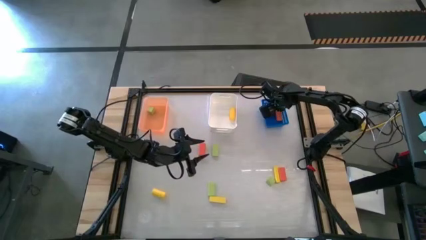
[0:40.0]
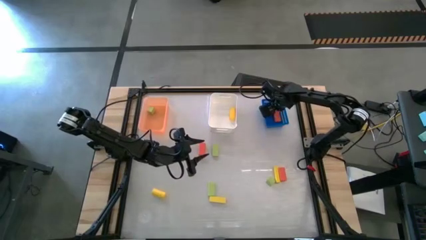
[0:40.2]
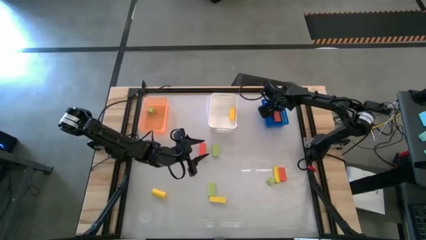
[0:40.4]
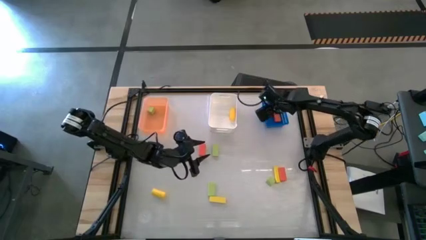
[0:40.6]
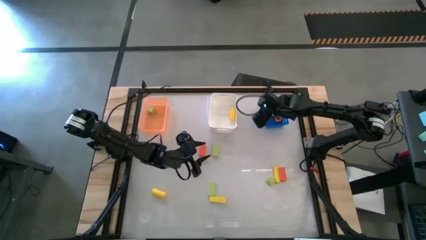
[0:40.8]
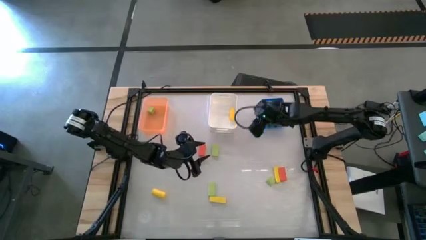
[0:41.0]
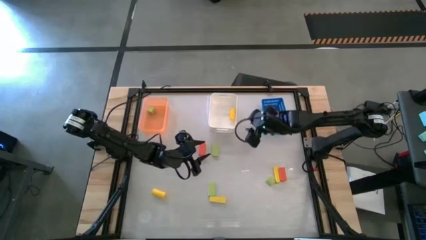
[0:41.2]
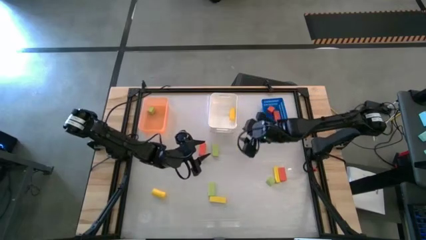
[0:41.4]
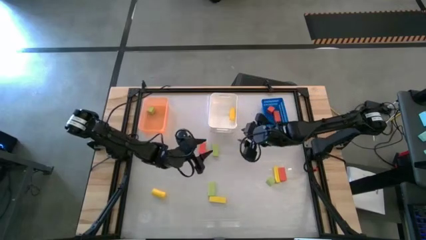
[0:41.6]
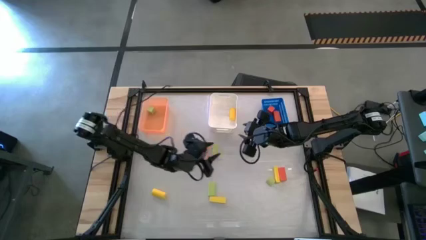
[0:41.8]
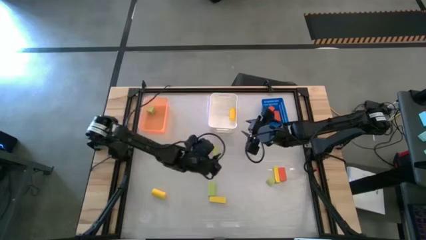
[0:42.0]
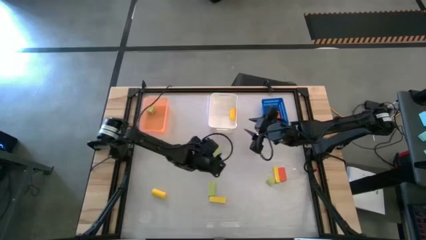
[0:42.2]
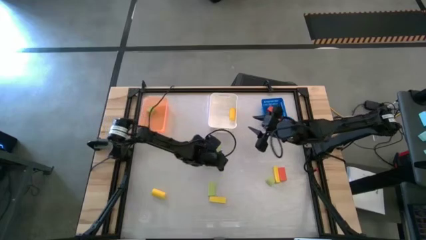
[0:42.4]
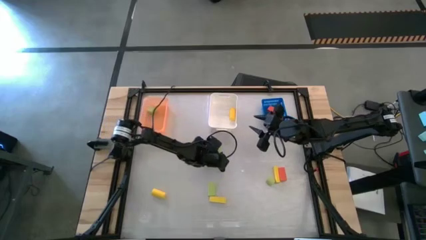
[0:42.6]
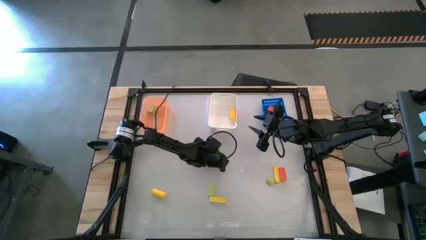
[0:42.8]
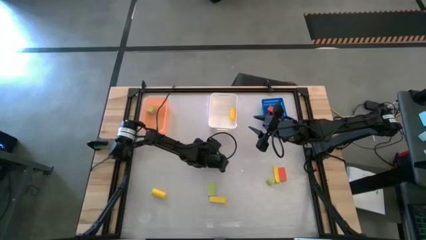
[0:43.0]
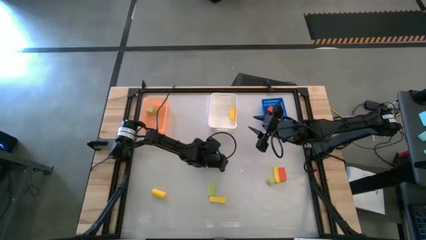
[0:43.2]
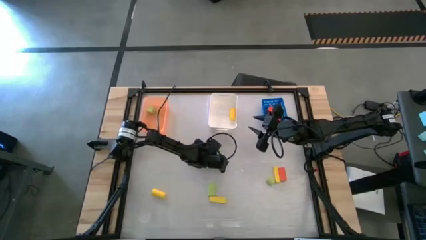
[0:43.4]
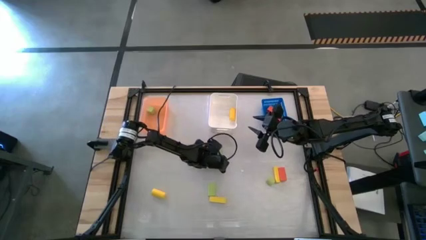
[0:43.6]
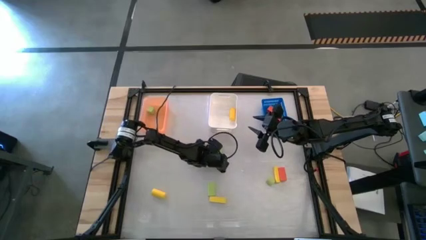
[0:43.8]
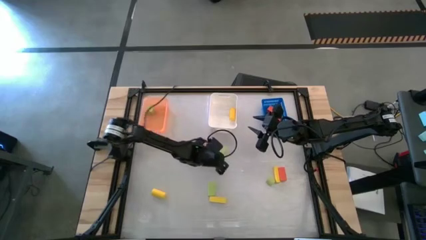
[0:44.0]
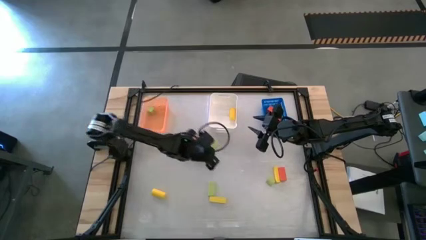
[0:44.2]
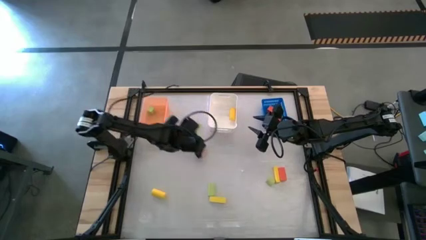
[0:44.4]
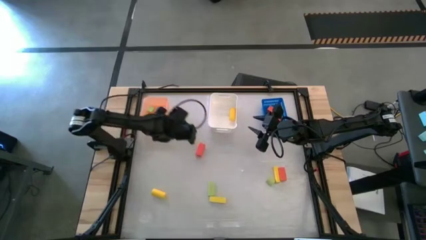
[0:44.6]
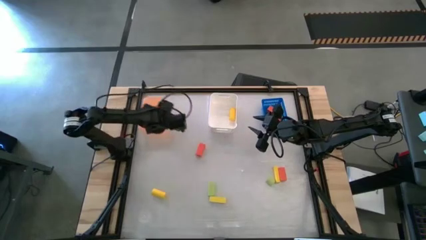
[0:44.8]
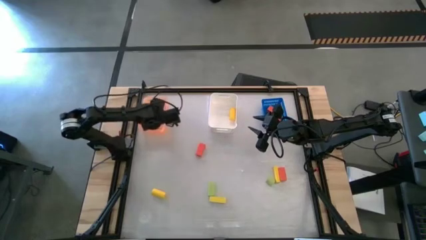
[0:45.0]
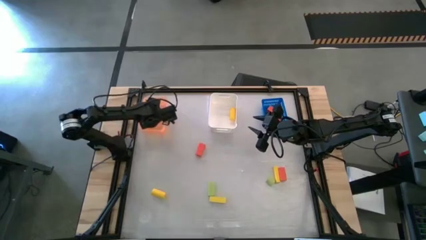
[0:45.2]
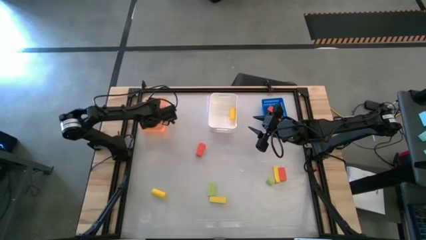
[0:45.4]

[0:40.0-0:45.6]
Task: Sort & place blocks by color
Put the top center green block into the orange bin

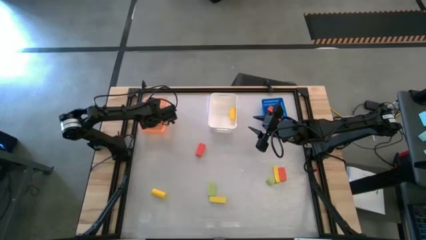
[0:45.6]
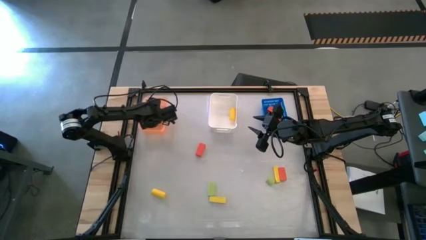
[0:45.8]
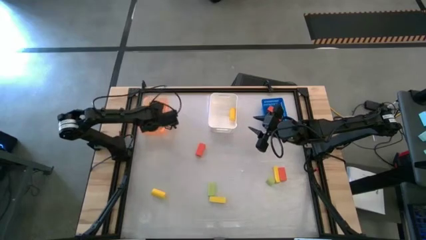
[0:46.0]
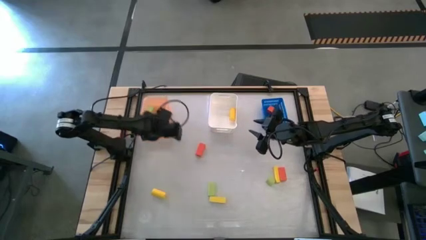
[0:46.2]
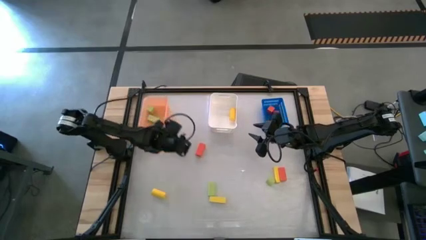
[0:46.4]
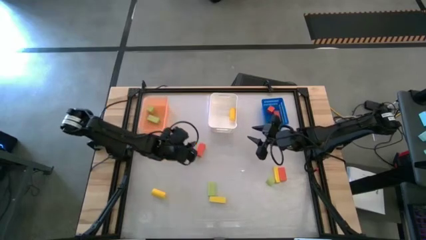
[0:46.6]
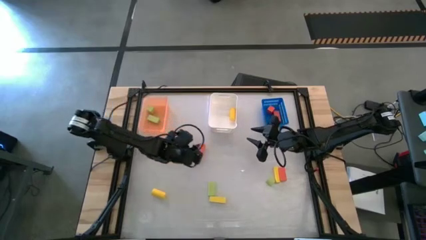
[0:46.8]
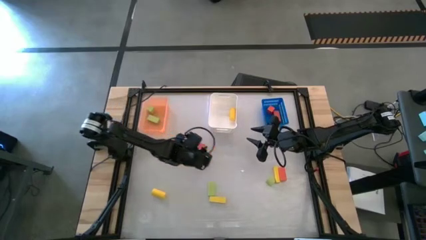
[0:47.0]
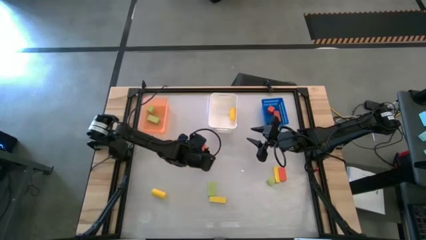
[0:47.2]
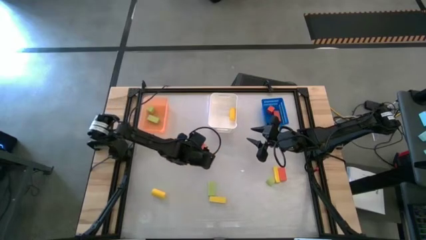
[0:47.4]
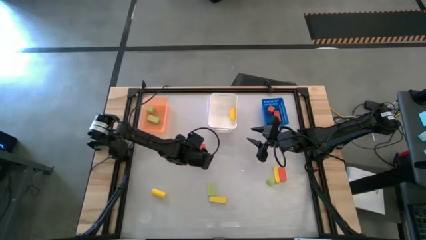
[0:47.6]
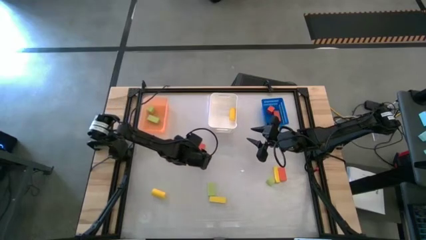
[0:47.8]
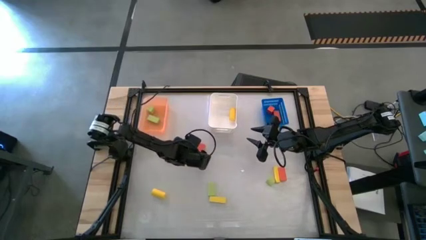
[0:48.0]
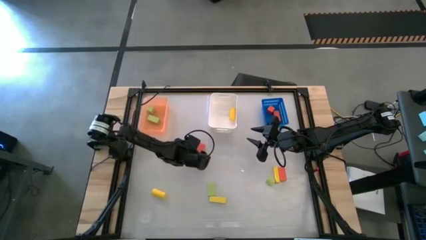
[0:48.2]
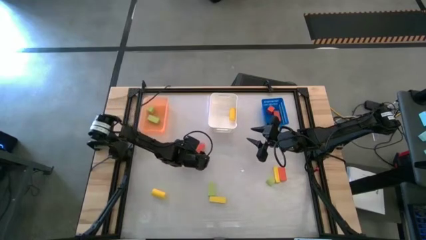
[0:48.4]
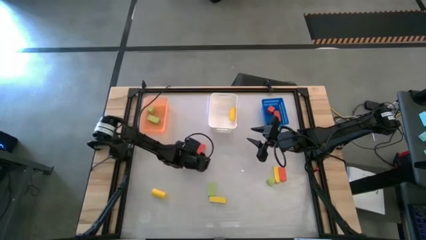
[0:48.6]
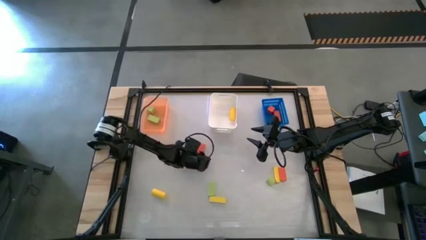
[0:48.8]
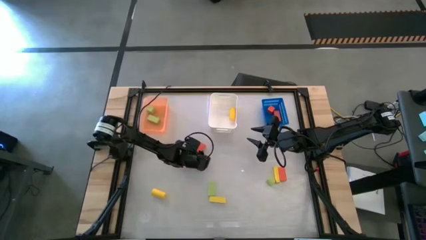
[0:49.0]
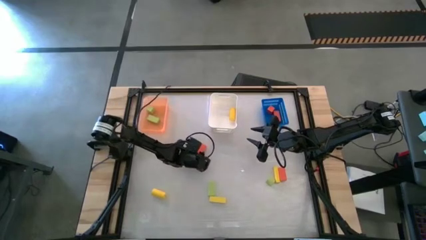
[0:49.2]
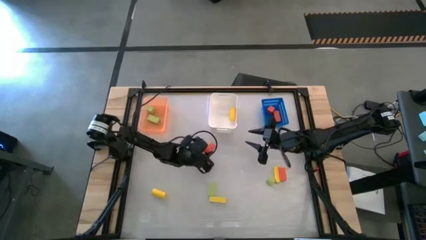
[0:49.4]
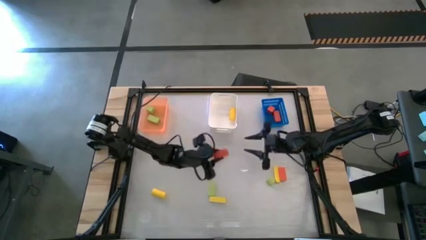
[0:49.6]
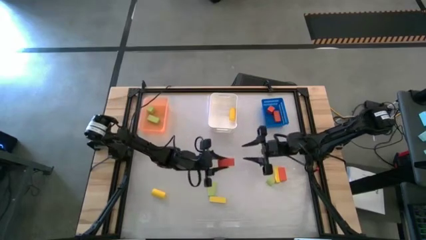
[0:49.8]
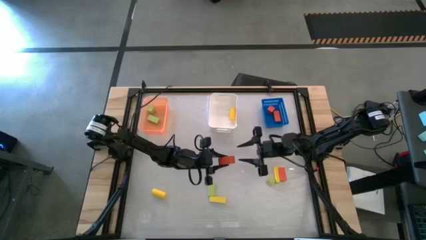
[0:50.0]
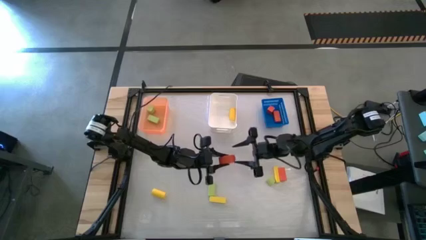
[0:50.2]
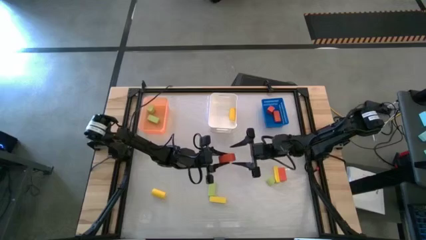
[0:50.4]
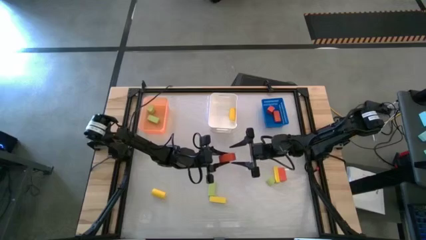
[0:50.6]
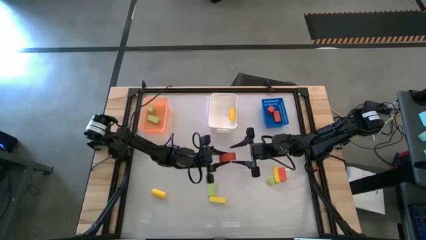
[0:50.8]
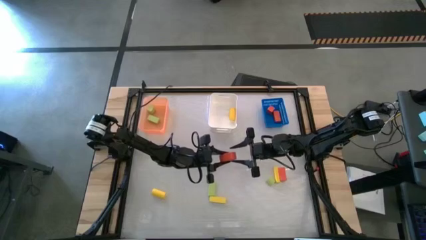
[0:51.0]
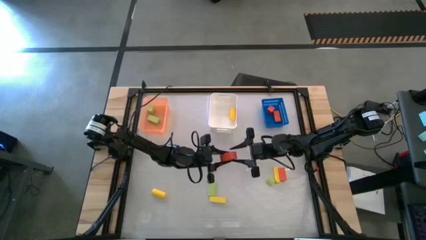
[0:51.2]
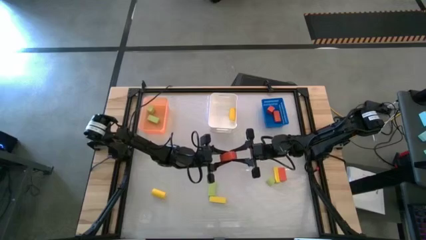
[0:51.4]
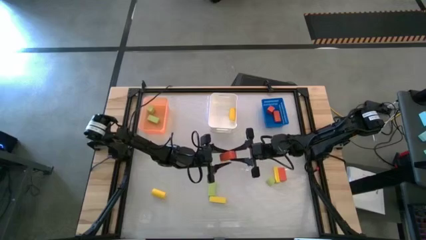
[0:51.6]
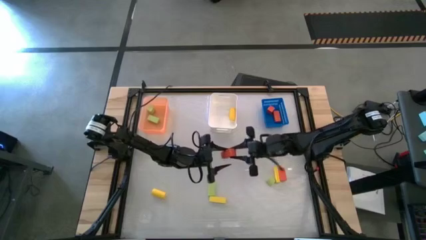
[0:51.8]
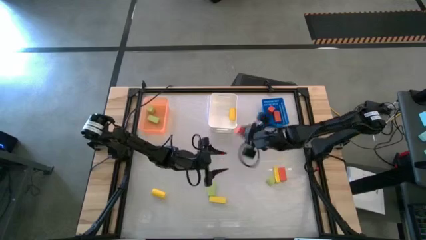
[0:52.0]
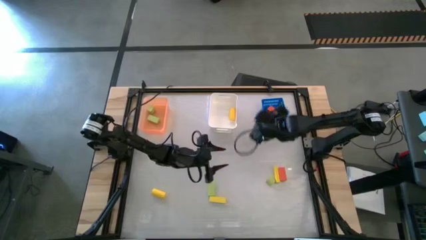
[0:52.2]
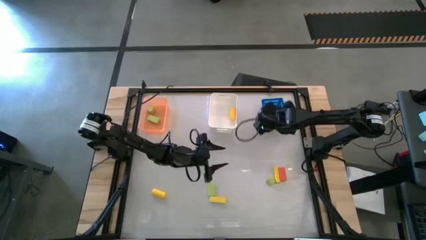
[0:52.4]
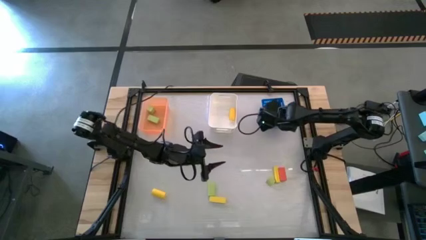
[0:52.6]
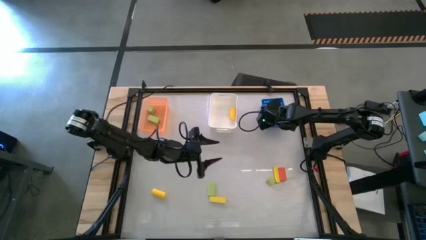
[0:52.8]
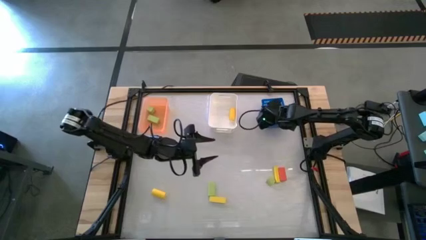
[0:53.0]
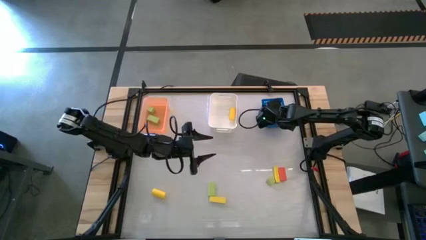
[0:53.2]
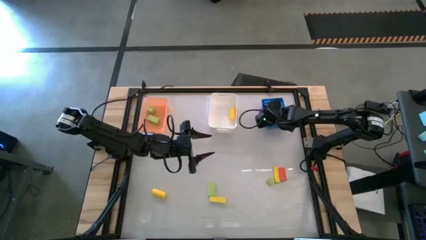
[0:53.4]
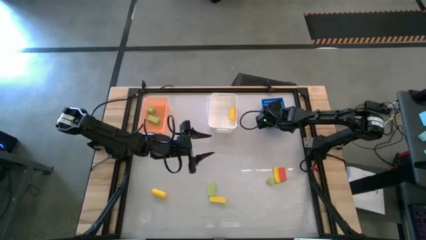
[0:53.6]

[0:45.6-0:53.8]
Put the top orange block into the blue bin

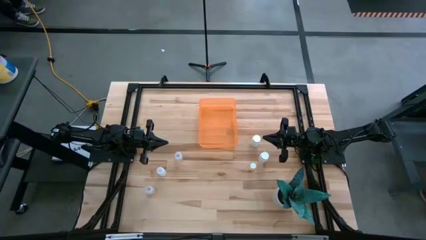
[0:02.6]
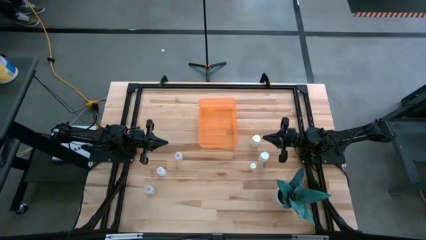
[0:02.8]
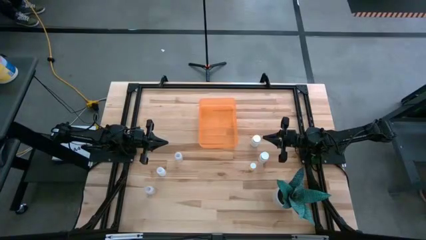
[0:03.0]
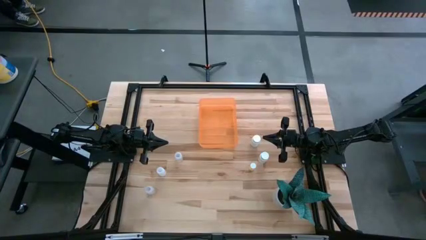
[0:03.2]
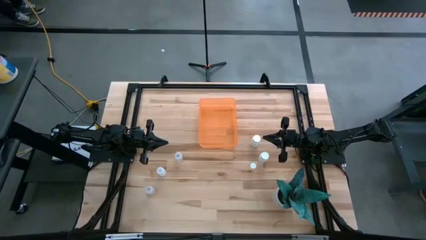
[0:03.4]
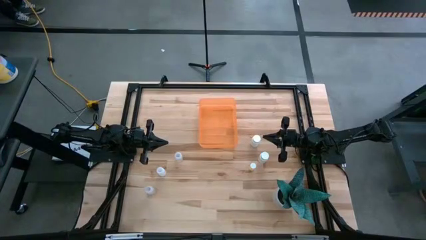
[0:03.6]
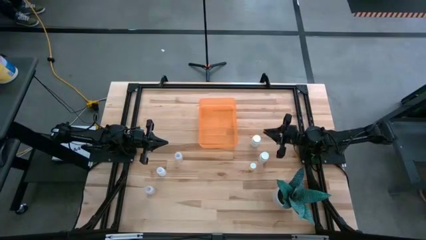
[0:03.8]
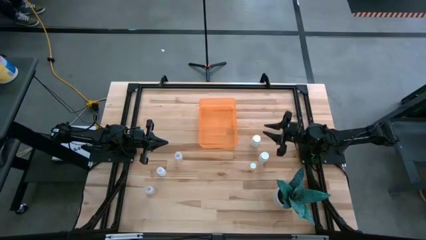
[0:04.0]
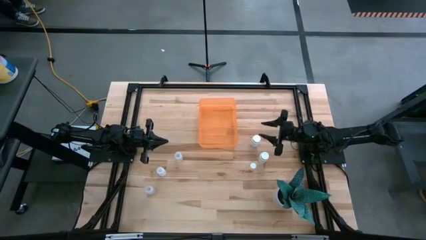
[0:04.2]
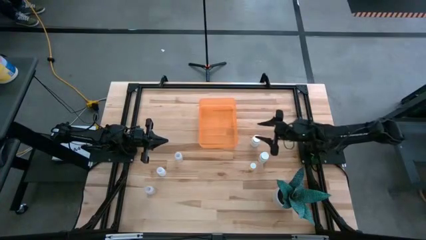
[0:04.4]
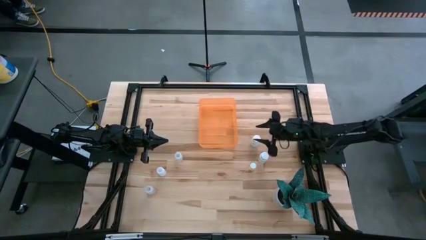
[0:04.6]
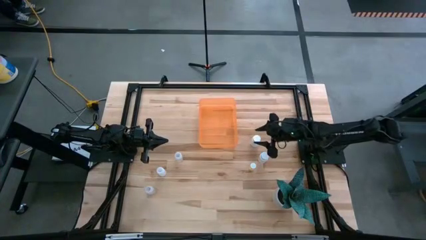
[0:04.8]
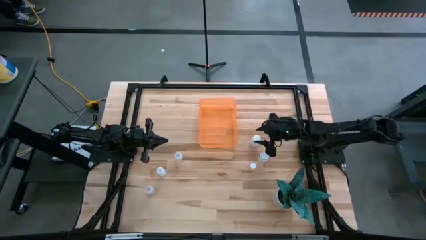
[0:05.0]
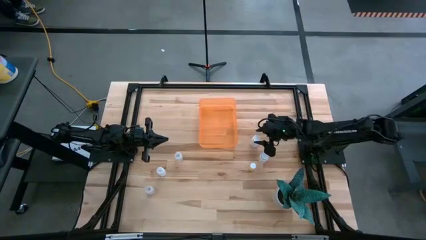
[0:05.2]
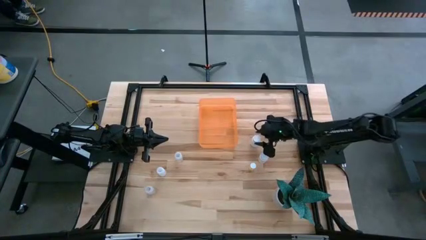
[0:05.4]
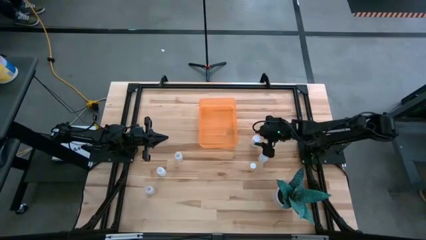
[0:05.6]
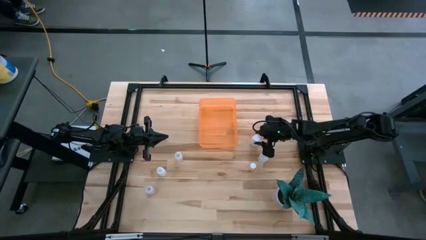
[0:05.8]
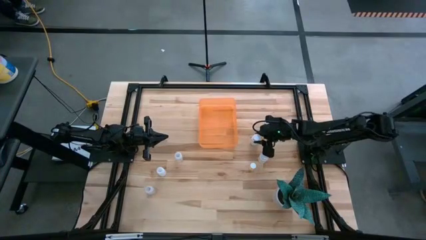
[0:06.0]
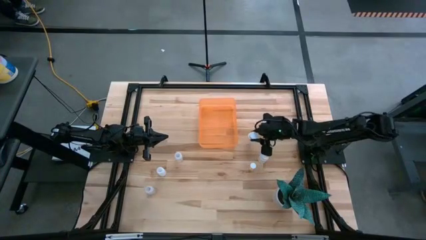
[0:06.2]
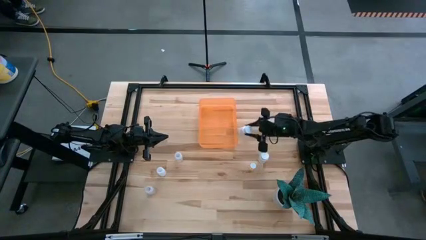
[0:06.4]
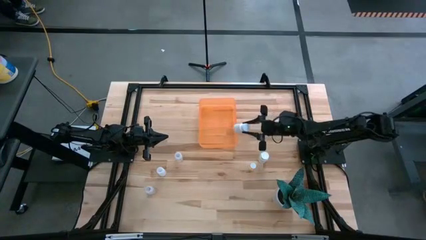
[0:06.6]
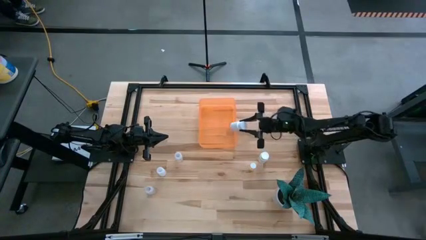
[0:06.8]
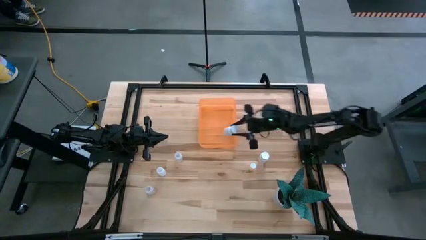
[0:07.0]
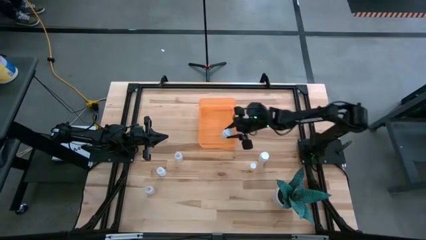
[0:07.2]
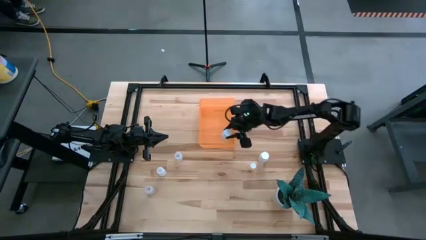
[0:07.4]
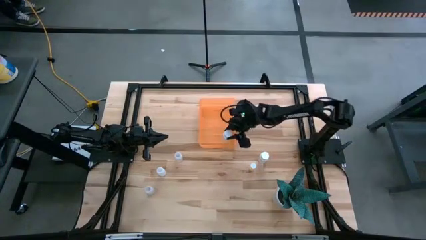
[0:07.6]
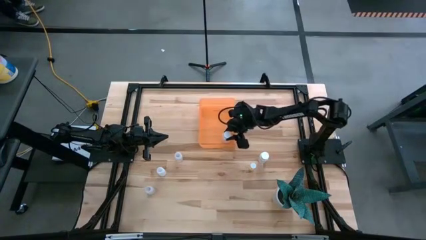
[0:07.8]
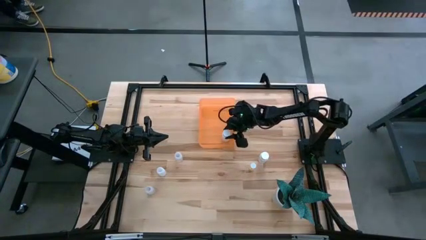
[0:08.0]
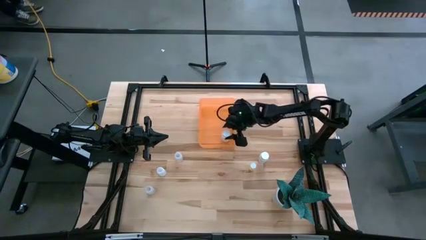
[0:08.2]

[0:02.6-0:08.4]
Task: Pick and place pill bottles into a basket
Put the top right white medicine bottle into the orange bin
